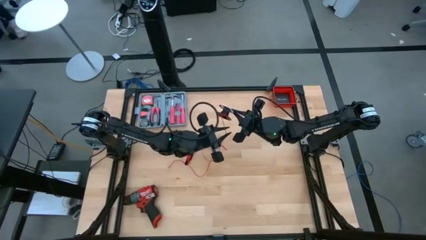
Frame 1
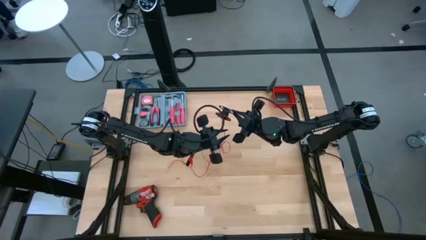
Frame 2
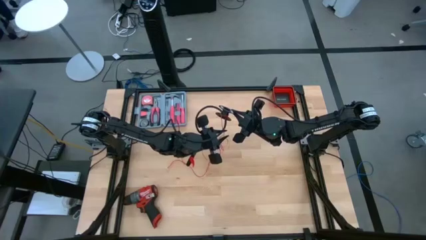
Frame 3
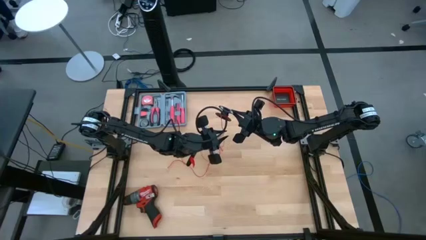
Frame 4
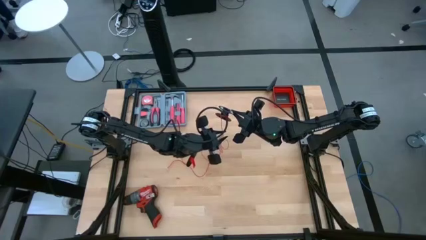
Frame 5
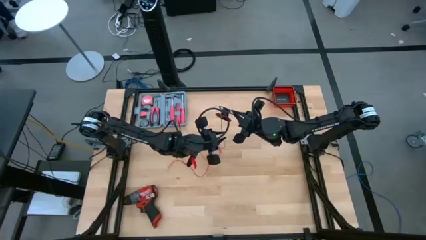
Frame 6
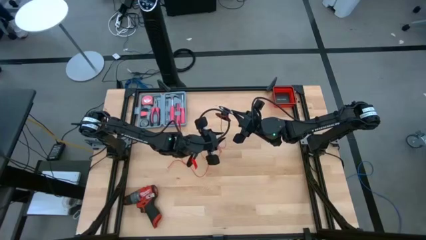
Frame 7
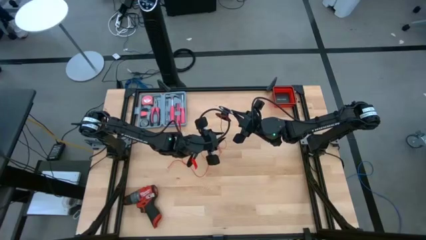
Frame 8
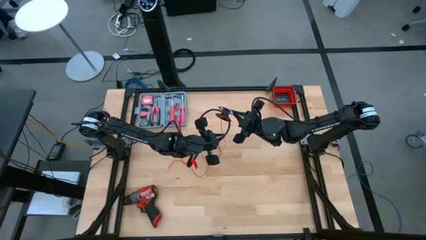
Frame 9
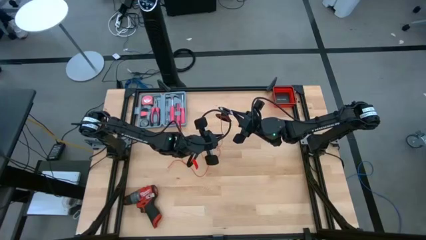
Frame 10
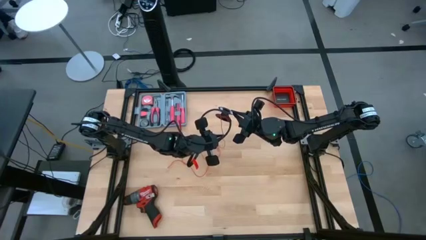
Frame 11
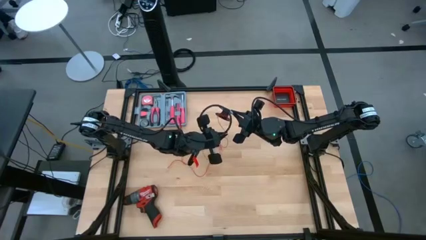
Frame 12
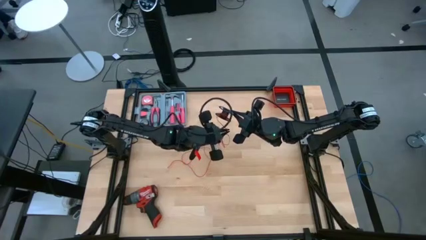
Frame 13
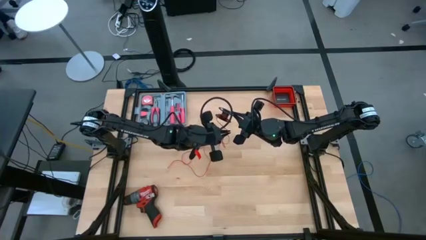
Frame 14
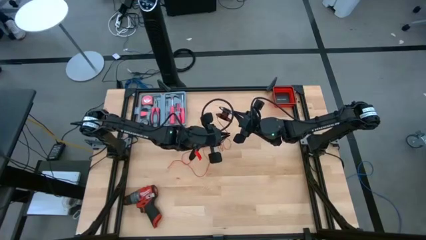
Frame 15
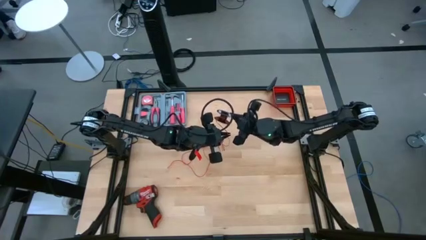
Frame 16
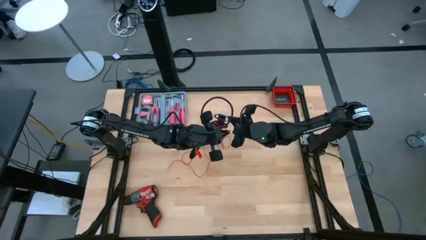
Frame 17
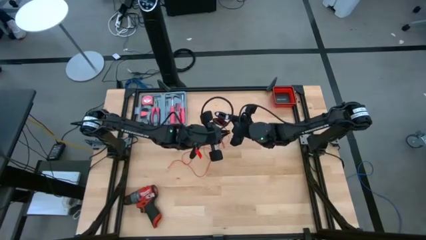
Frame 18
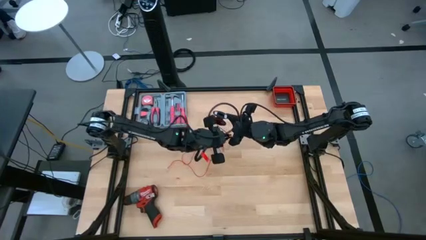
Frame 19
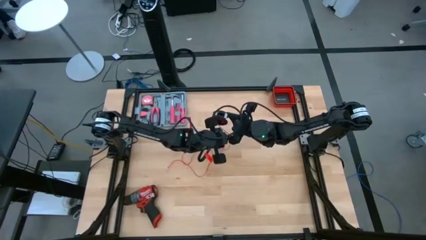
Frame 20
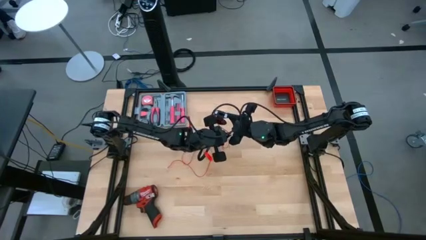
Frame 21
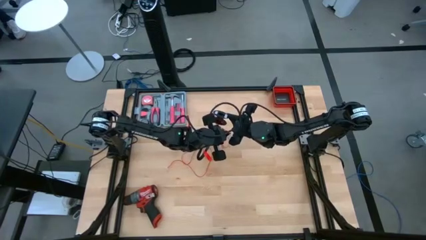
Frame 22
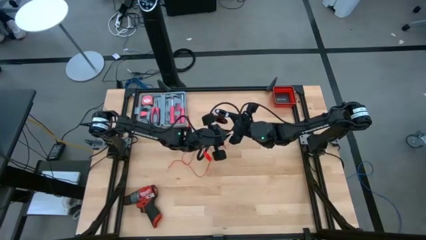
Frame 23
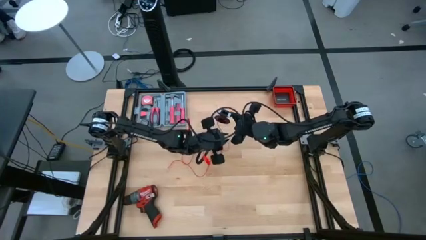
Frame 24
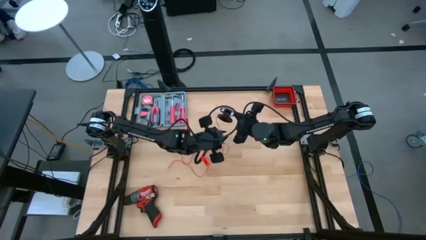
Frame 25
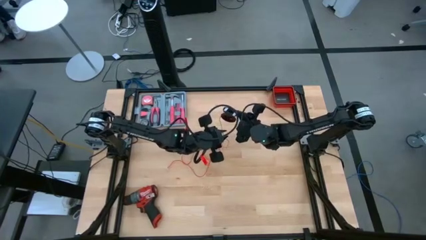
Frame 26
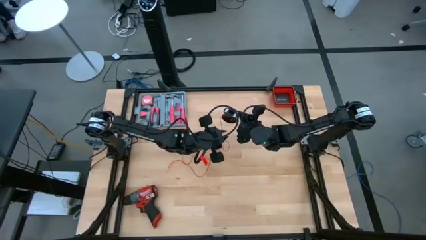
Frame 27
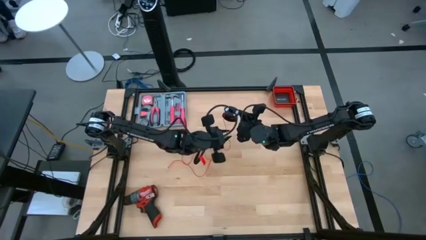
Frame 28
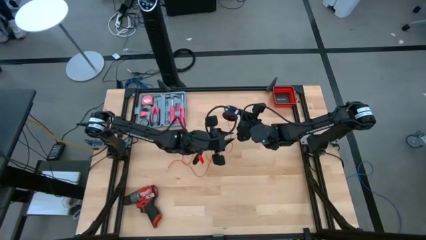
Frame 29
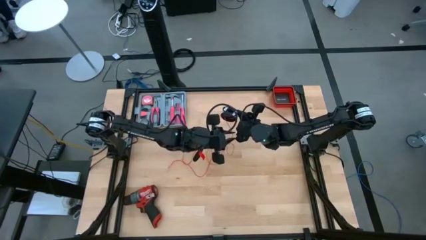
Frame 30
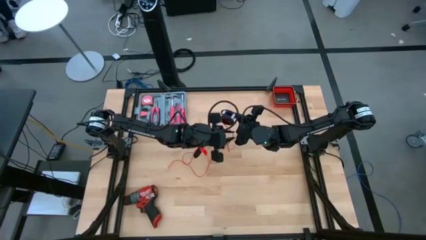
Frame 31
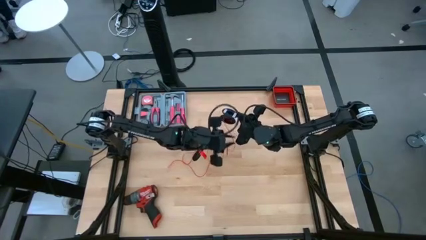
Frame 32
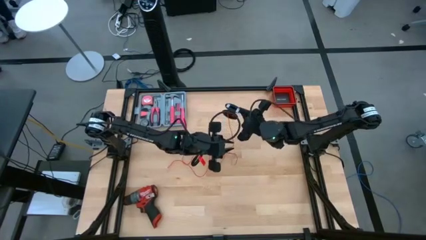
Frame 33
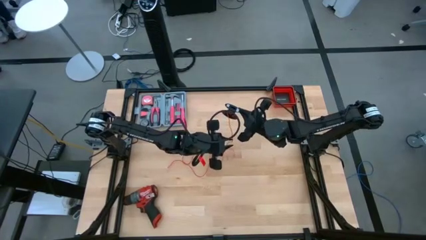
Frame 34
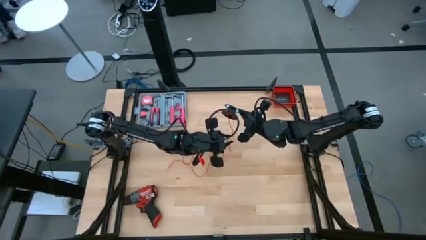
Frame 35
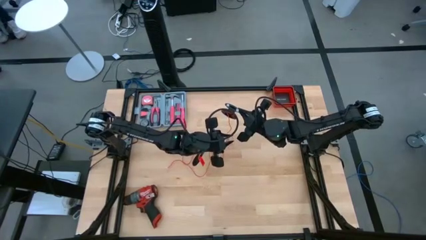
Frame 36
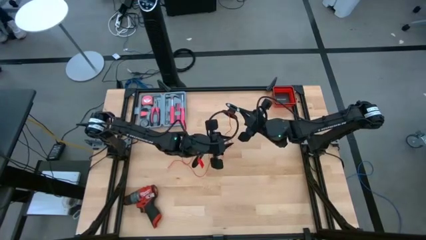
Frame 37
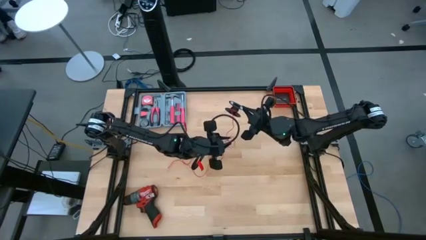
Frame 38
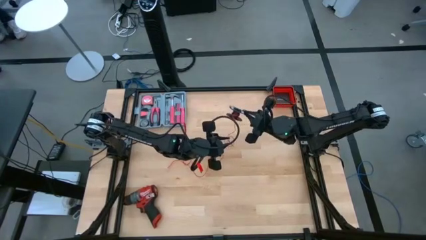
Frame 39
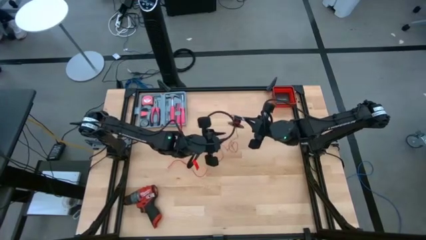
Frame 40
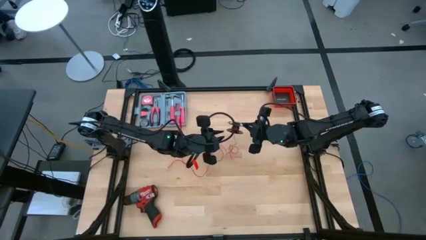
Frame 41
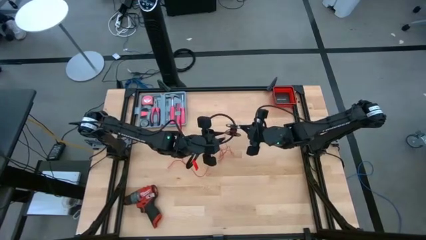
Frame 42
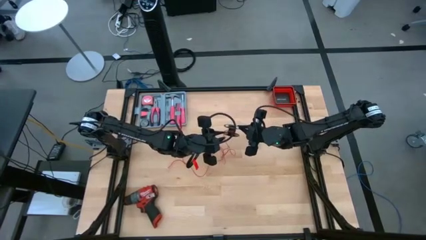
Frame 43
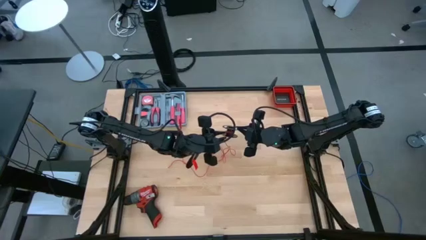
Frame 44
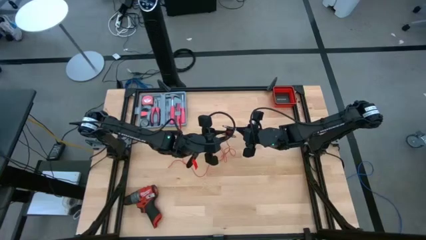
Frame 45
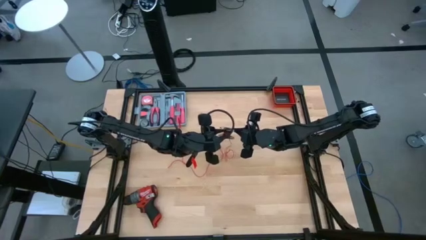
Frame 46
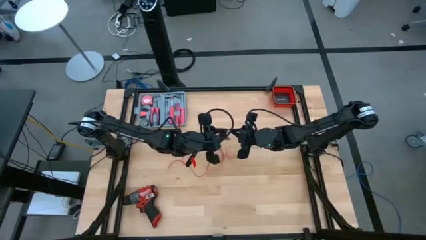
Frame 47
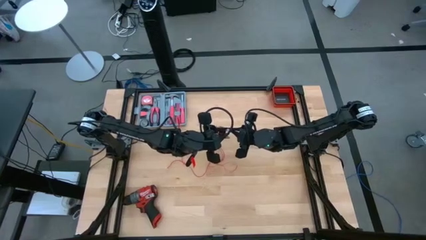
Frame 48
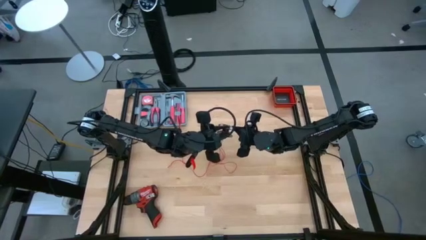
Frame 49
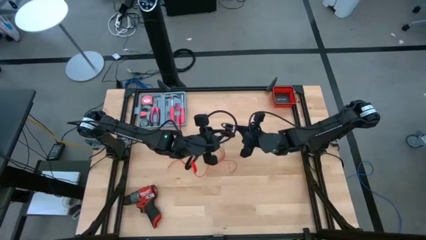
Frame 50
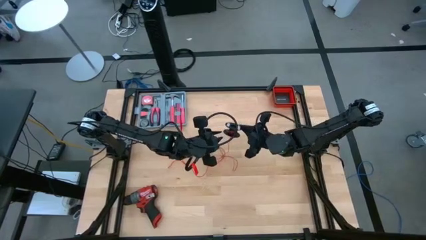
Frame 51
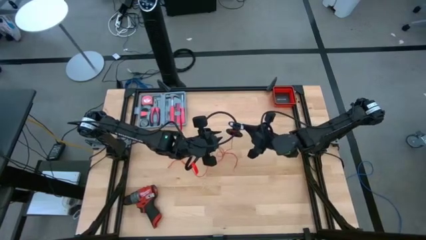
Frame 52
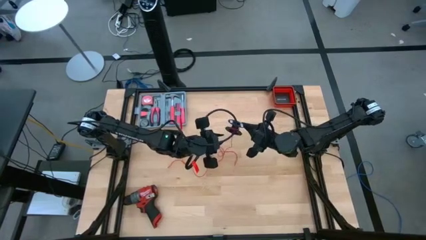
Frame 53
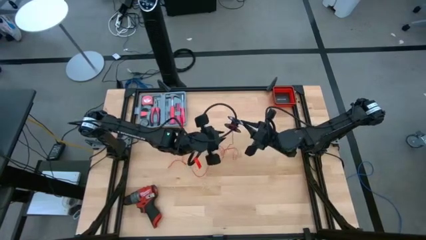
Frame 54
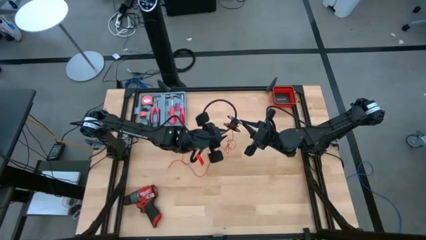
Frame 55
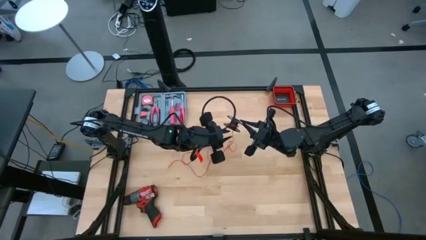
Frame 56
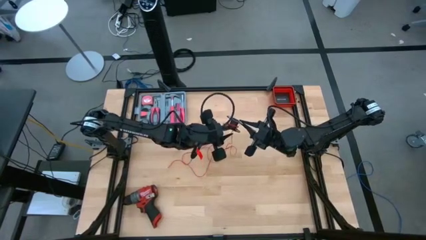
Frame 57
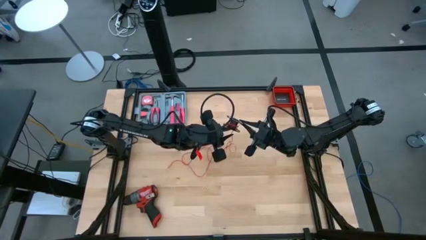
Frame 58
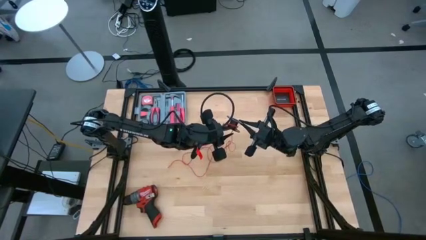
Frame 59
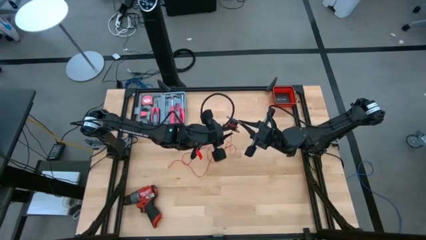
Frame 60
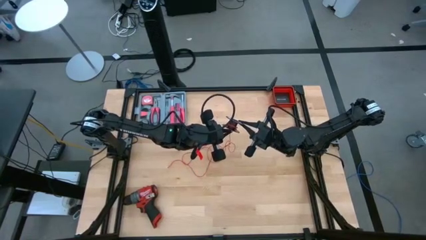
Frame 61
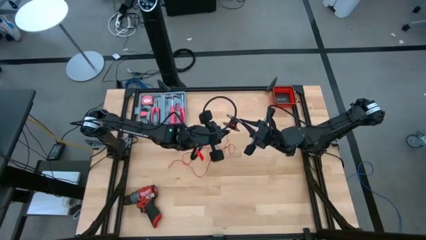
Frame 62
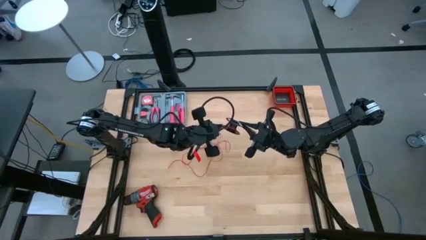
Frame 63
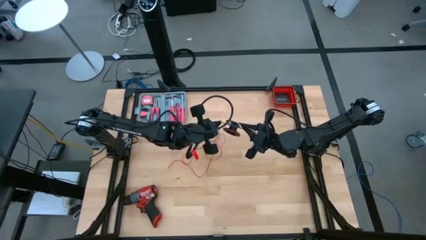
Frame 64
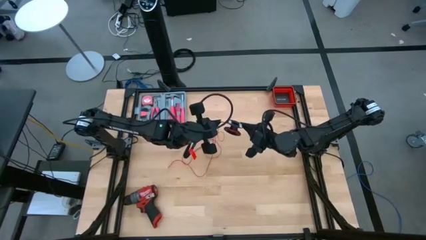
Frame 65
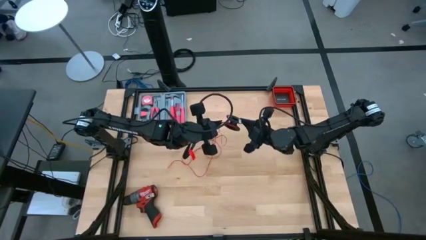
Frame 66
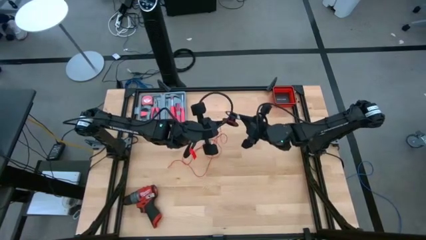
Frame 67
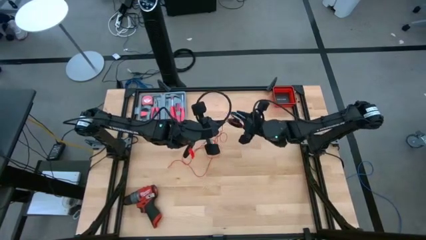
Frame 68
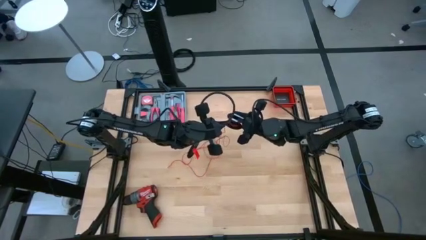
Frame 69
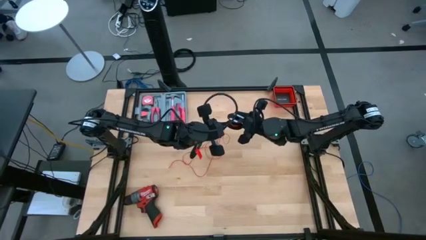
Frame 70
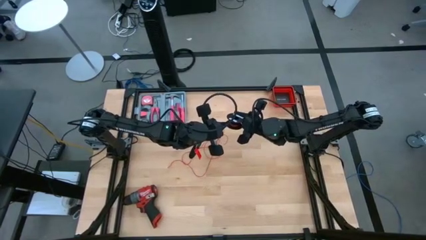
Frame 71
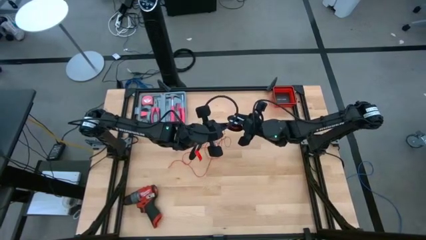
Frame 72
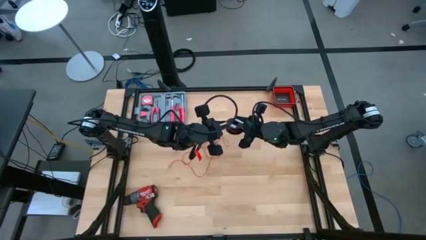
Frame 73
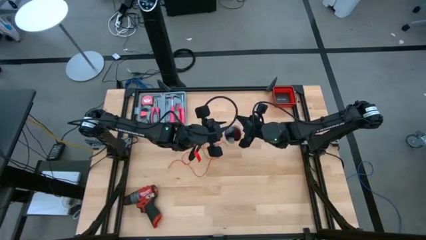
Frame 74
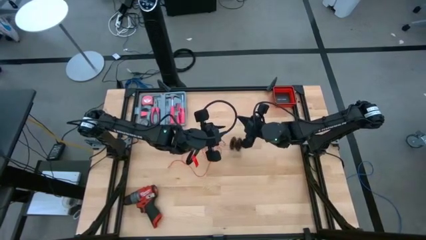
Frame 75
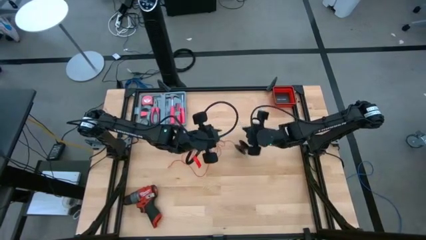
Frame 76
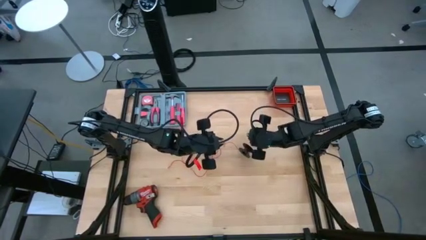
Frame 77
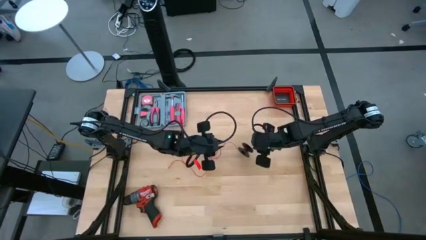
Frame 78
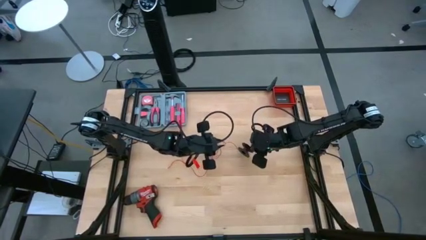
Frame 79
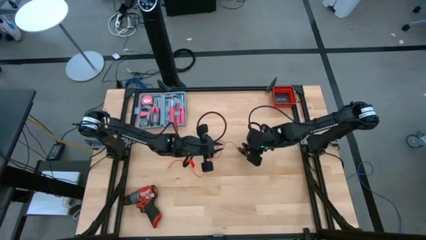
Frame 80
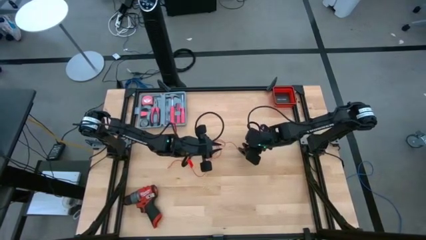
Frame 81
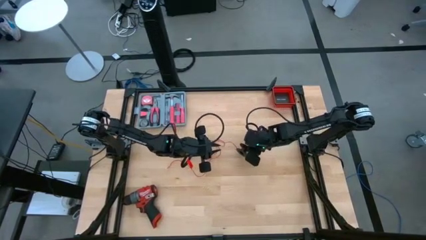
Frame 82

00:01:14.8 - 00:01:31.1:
Task: Coil cords
Coil the red wire on the black spool
